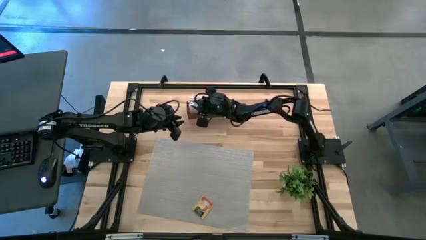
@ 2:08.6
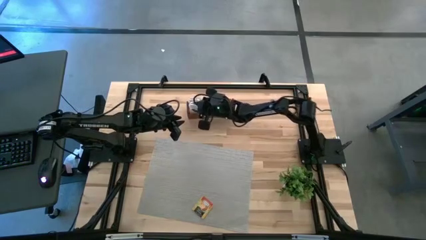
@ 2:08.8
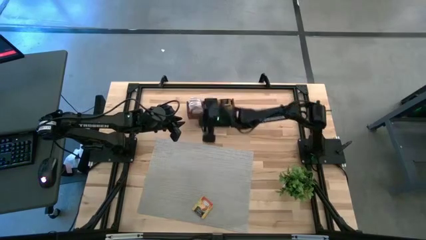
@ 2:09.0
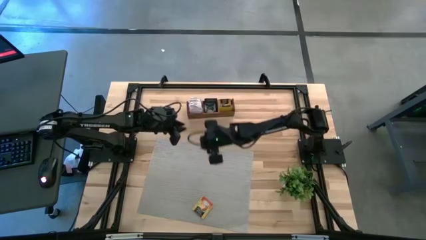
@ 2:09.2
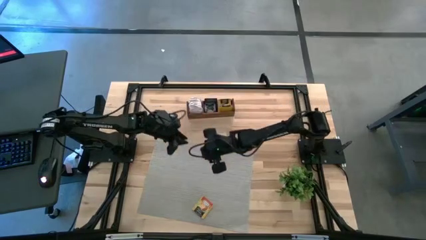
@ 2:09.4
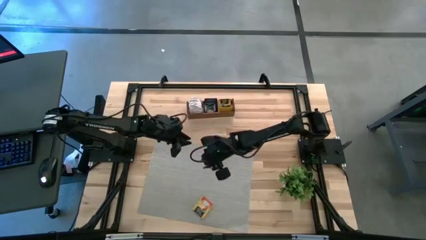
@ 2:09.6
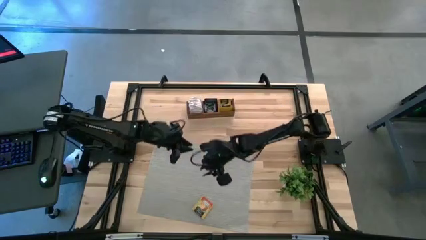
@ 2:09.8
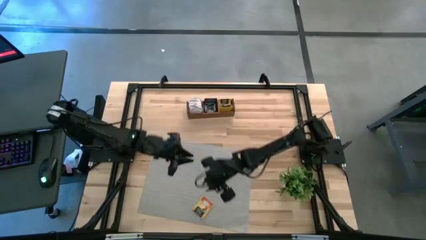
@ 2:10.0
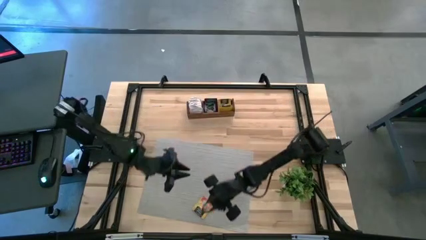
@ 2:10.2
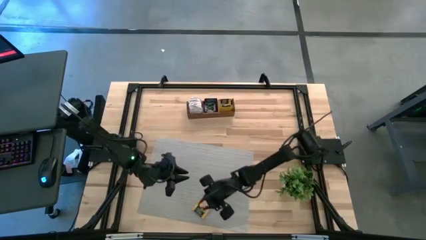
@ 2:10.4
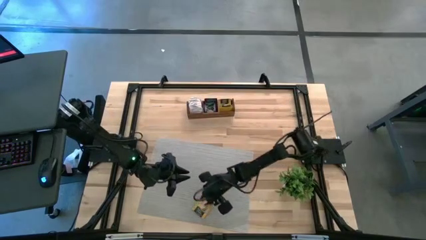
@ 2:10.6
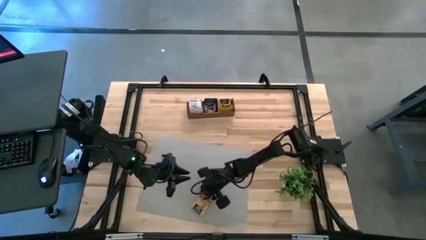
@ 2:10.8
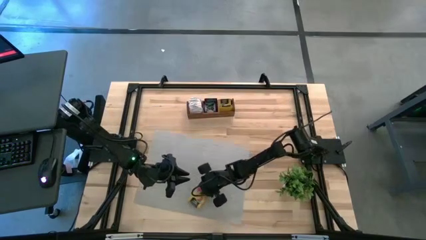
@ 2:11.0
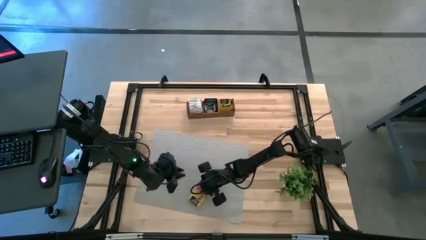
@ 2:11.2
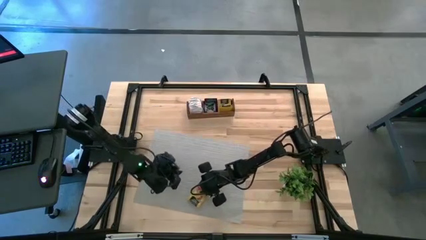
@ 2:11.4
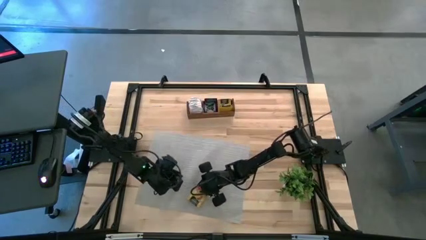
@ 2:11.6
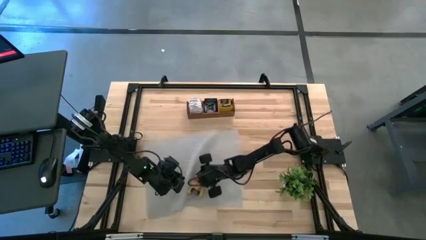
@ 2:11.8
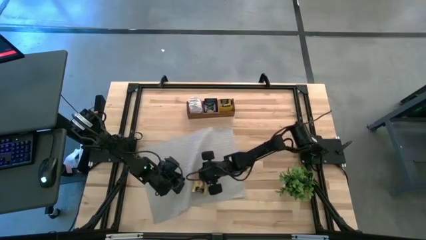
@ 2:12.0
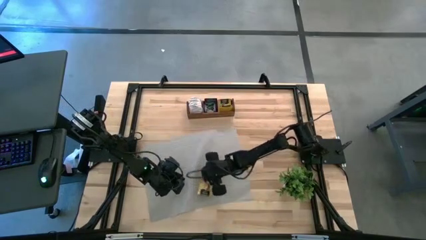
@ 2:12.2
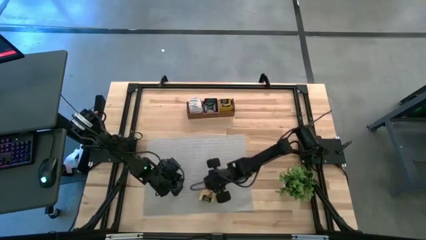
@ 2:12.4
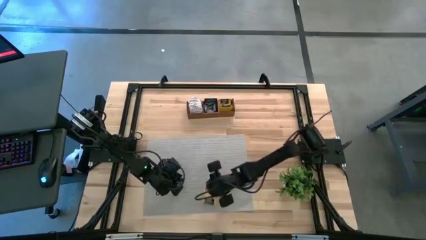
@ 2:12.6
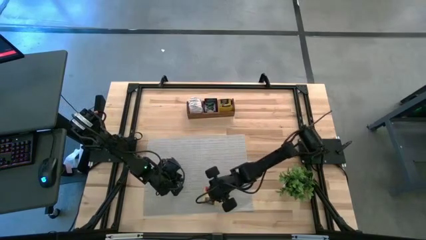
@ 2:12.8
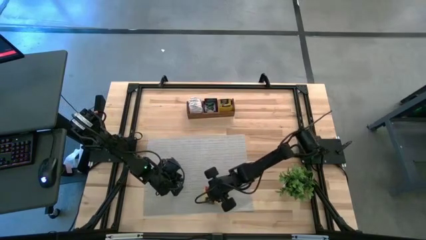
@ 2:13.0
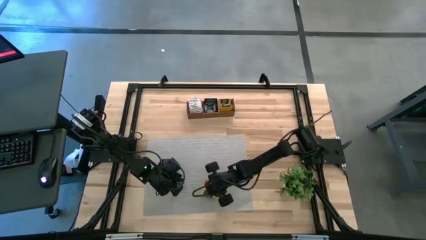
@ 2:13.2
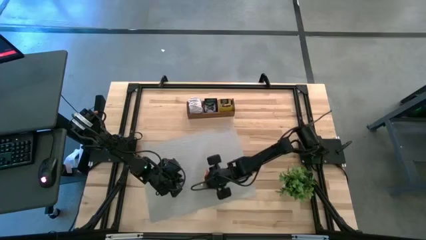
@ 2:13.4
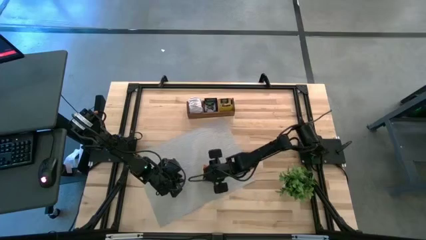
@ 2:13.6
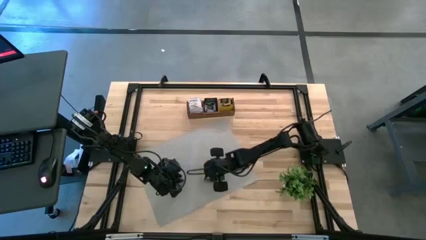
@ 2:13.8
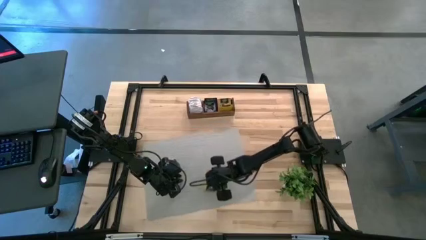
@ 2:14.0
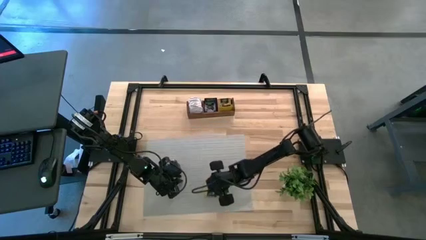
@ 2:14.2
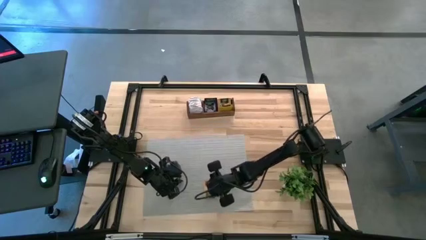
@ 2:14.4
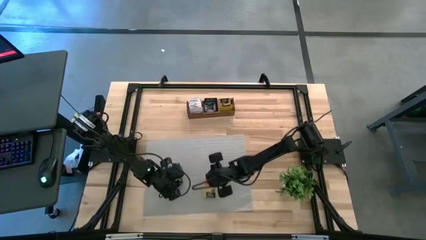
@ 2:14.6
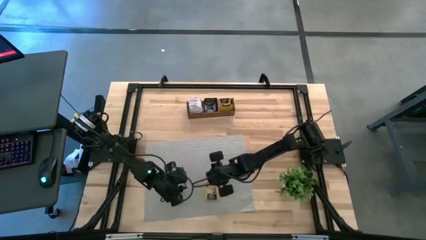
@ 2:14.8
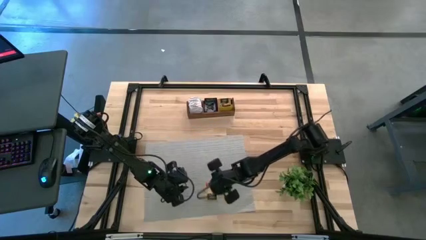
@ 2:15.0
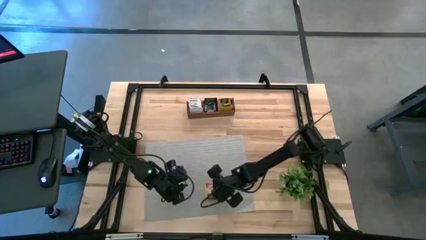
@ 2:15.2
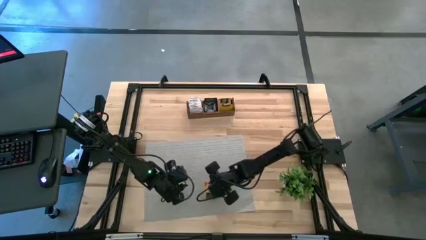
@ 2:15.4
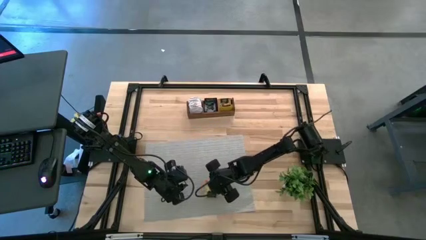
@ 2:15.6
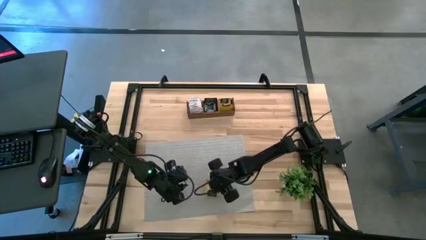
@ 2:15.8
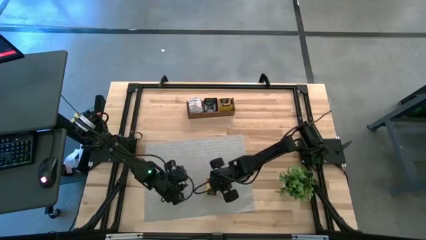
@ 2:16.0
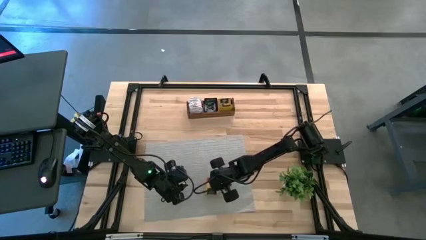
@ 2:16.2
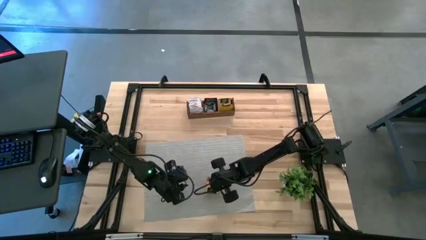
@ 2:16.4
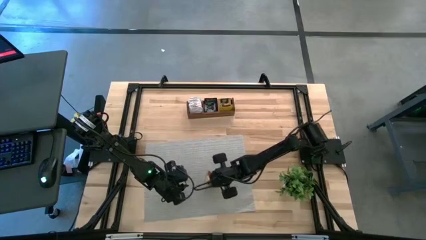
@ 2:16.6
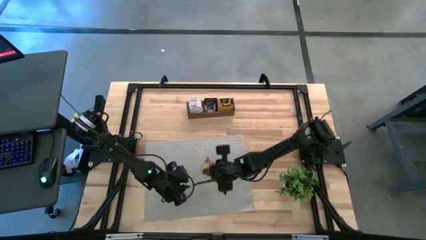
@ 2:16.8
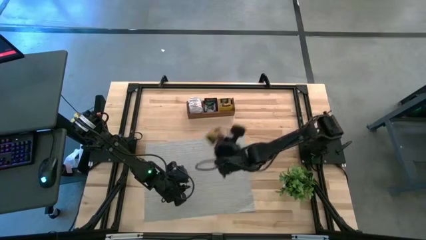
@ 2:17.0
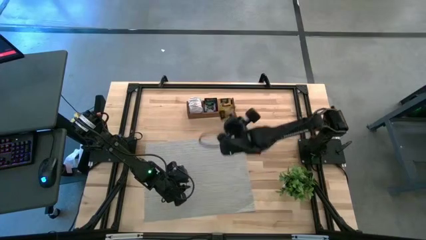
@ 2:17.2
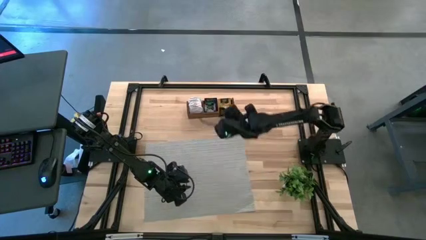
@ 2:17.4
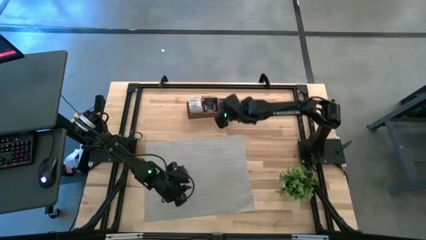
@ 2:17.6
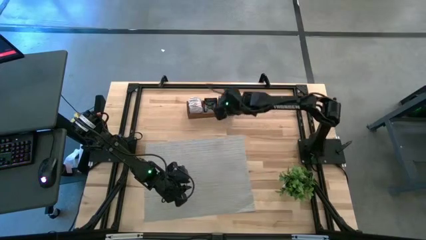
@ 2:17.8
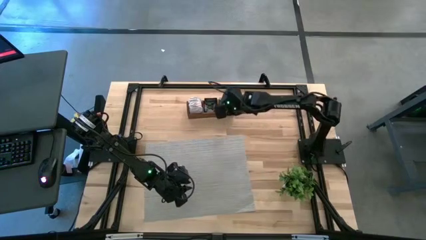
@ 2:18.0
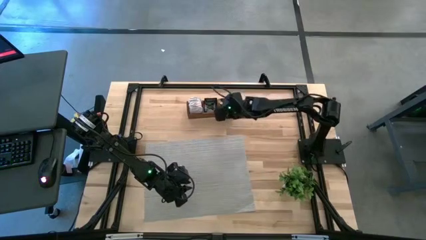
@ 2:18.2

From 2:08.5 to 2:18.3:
Task: Pick & Place Tea
Put the yellow tea bag into the right section of the wooden organizer

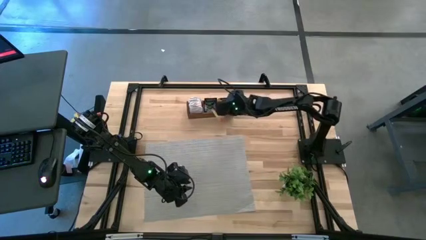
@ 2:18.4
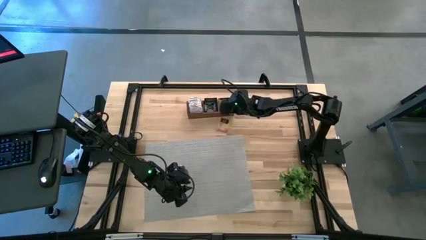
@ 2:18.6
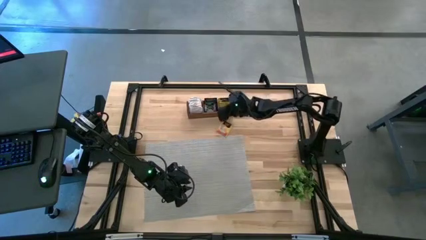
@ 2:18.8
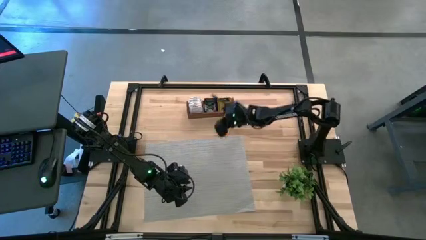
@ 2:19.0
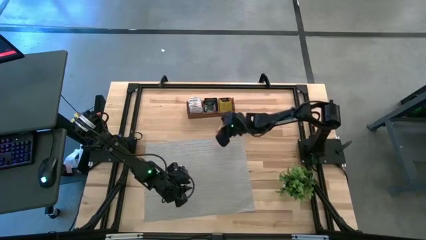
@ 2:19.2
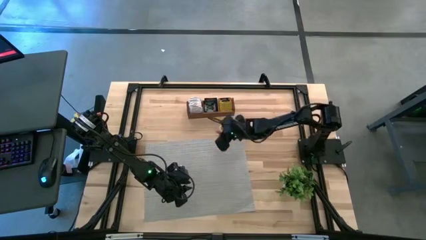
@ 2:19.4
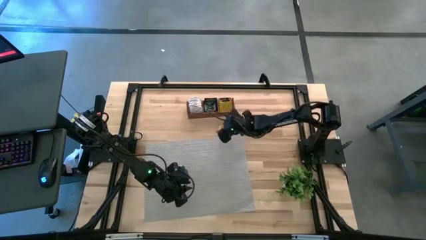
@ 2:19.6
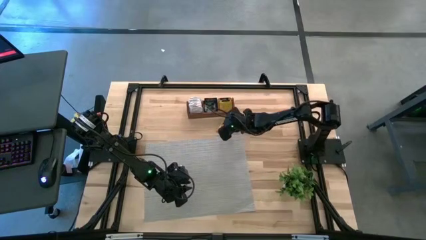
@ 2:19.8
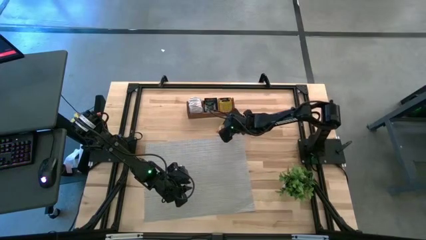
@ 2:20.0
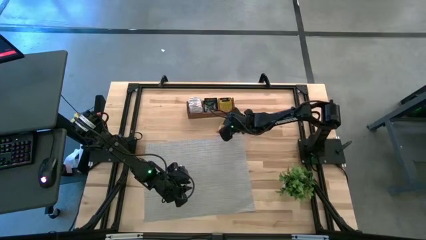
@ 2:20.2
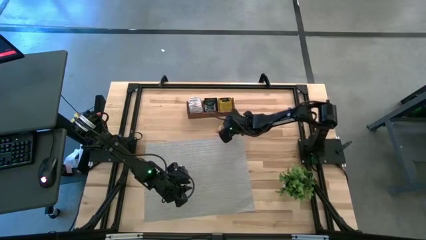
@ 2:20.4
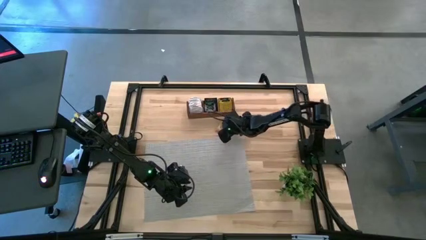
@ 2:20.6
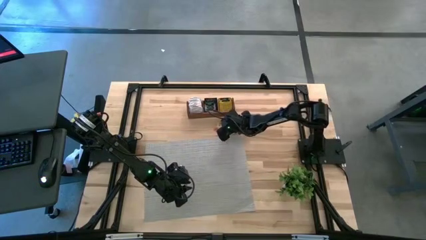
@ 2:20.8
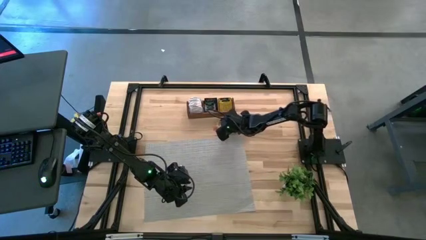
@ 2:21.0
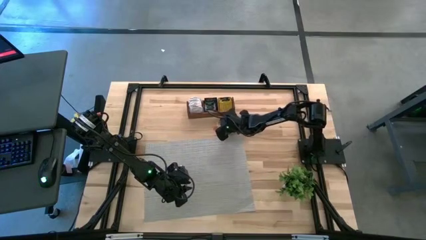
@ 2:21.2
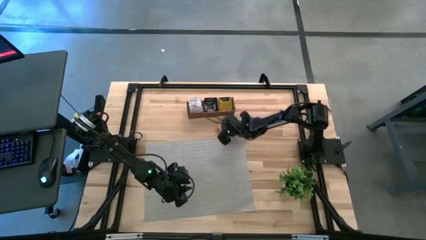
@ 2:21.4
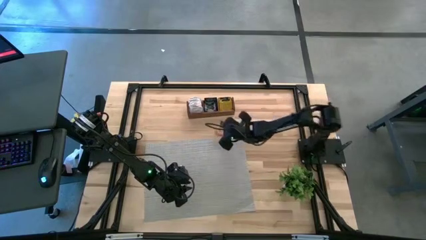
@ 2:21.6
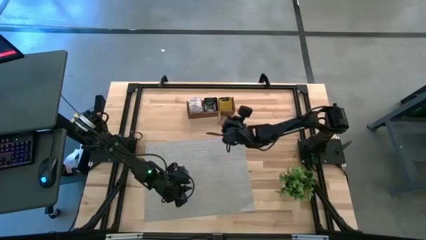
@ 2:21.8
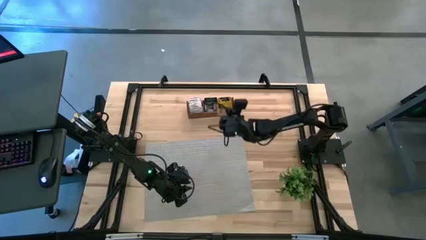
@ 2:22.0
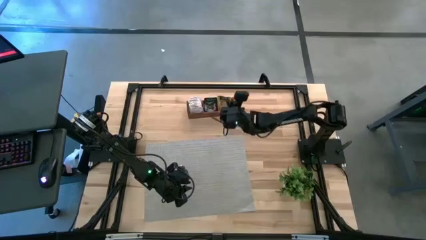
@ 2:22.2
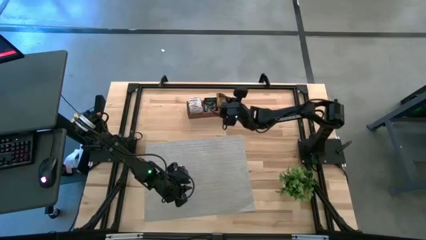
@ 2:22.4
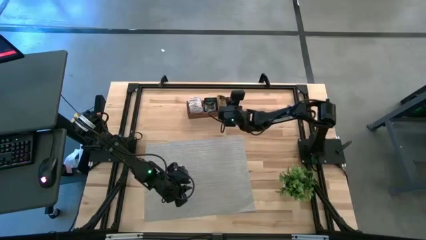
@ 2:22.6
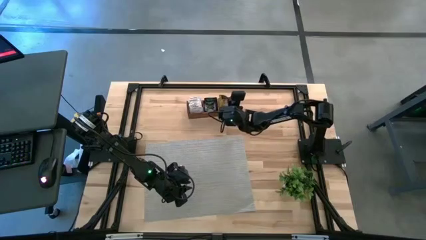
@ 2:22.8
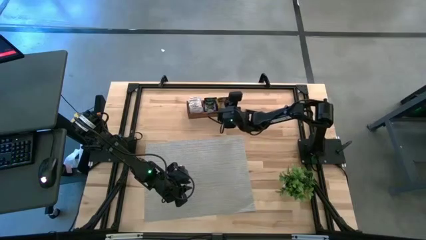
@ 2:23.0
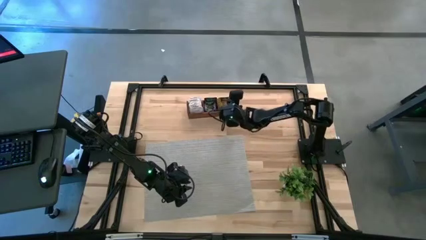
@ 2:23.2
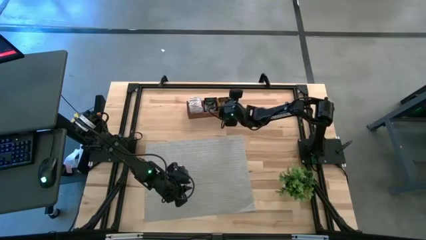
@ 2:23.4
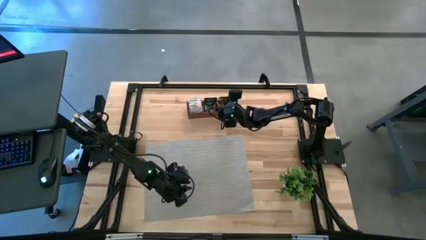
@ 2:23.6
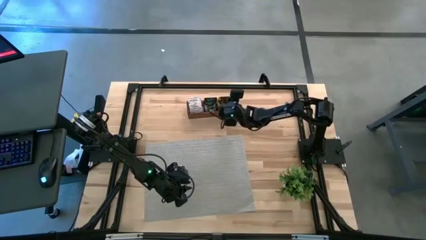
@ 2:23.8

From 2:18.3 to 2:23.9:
Put the yellow tea bag into the right section of the wooden organizer
